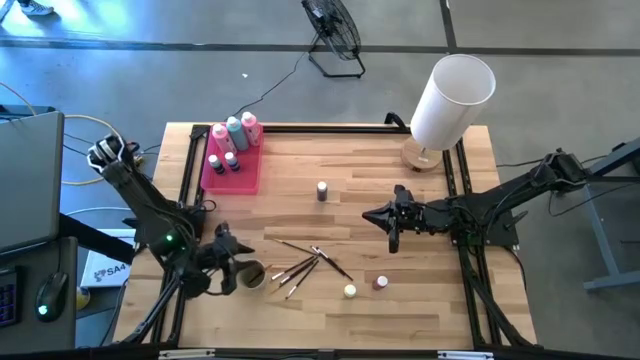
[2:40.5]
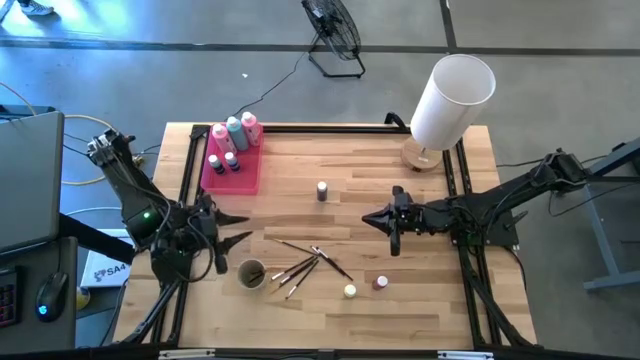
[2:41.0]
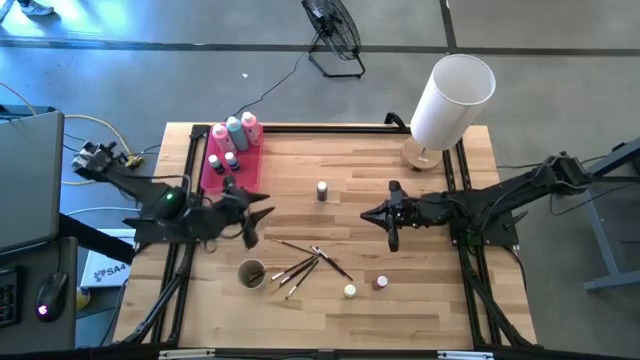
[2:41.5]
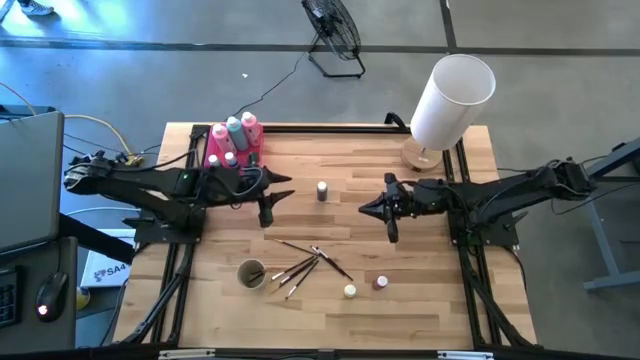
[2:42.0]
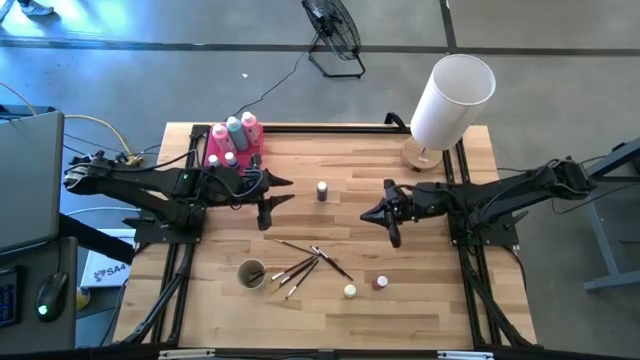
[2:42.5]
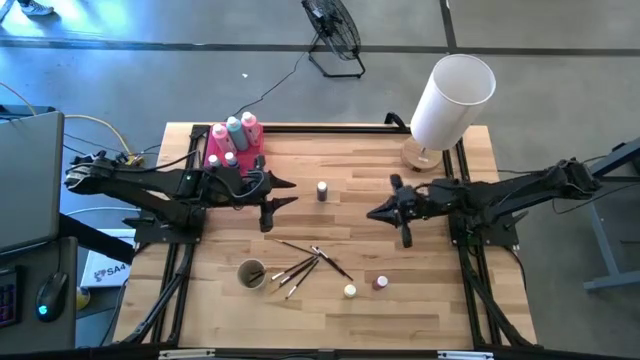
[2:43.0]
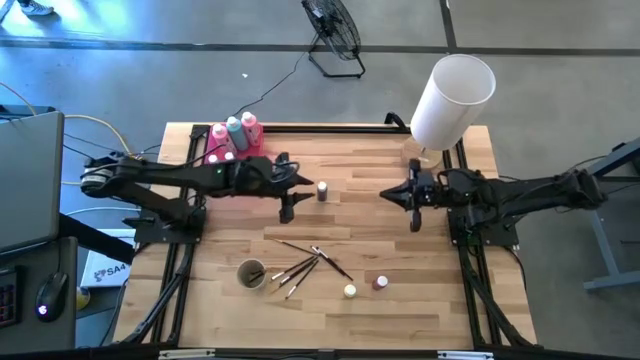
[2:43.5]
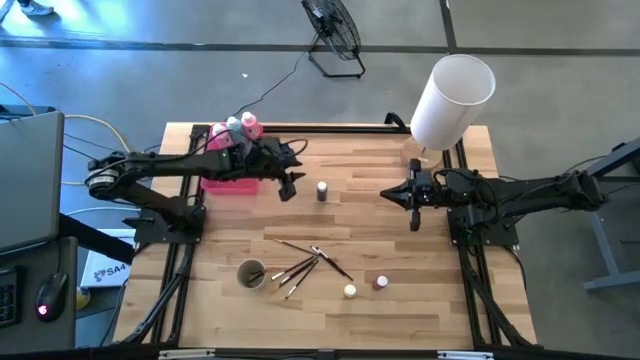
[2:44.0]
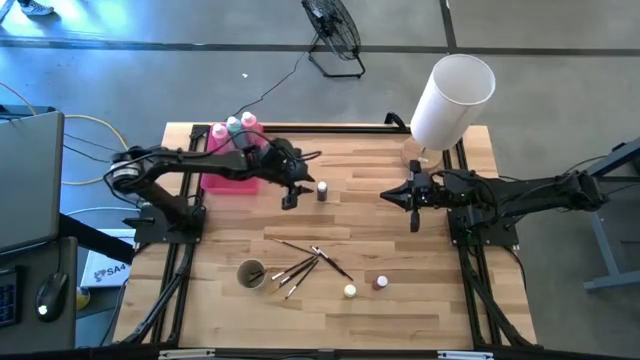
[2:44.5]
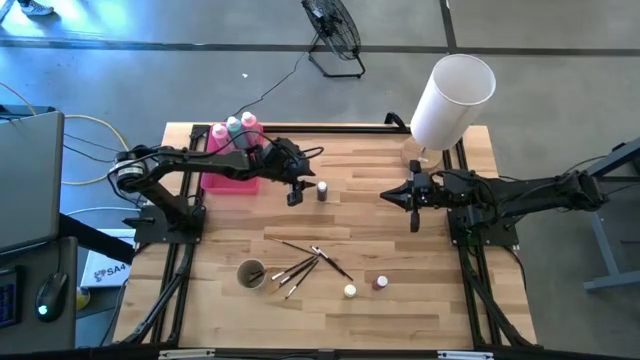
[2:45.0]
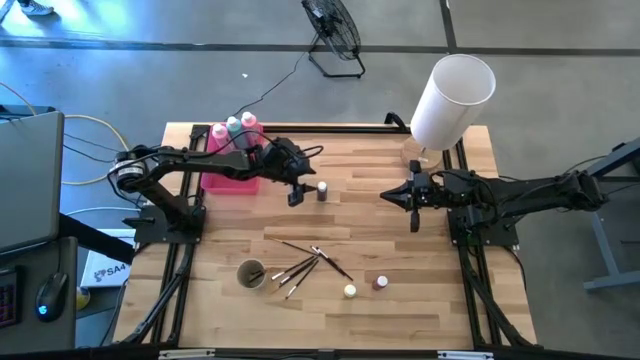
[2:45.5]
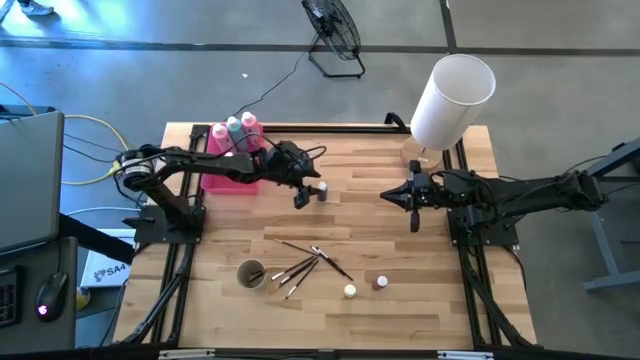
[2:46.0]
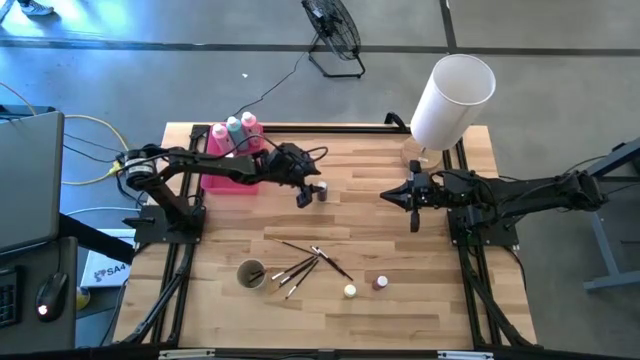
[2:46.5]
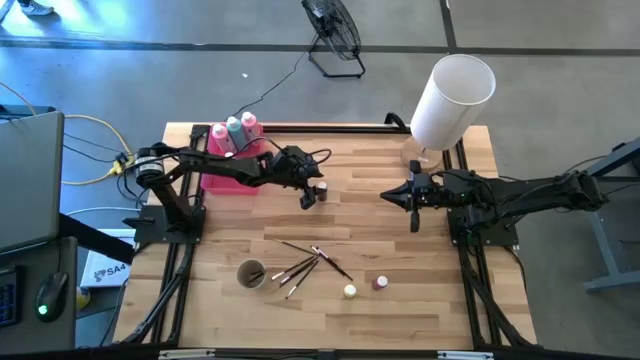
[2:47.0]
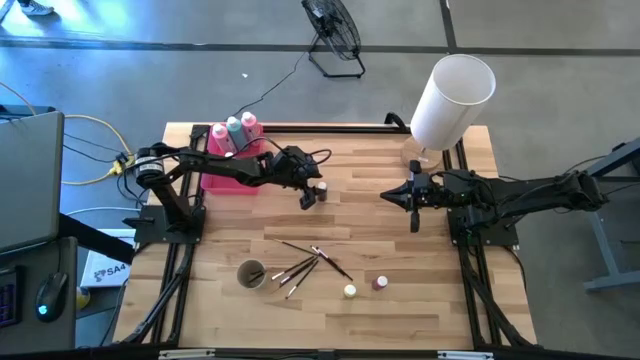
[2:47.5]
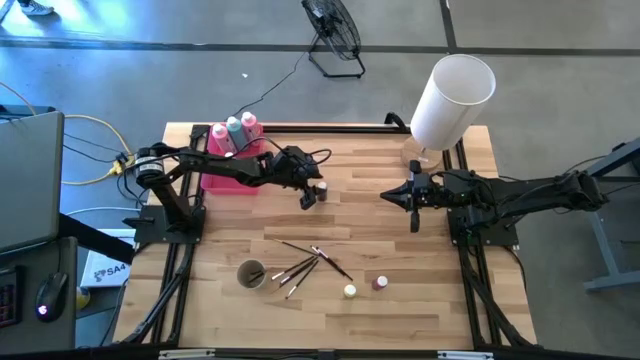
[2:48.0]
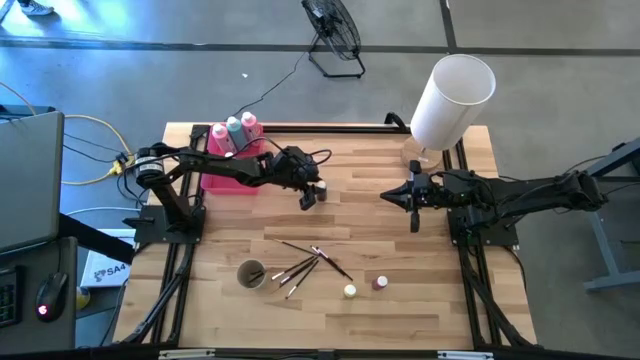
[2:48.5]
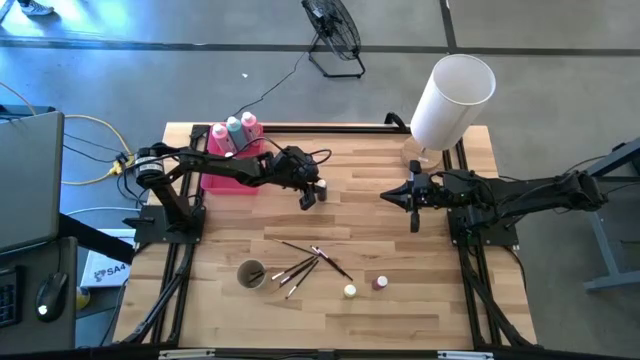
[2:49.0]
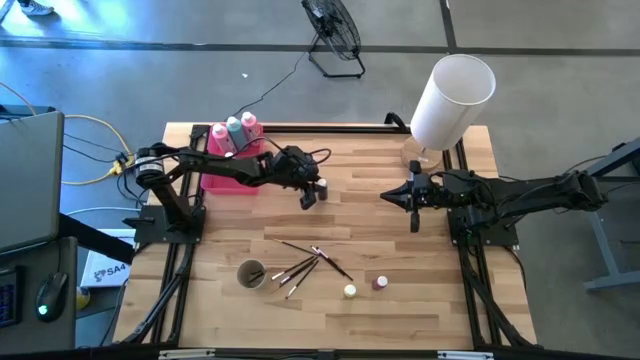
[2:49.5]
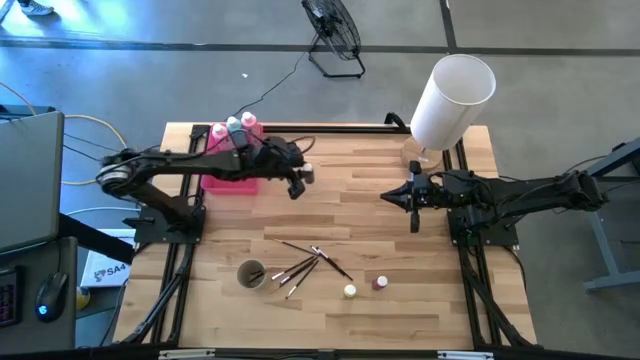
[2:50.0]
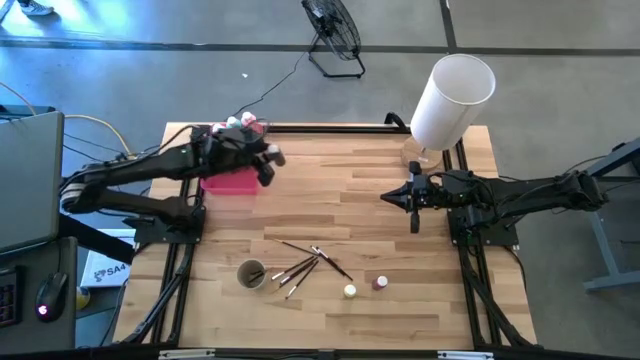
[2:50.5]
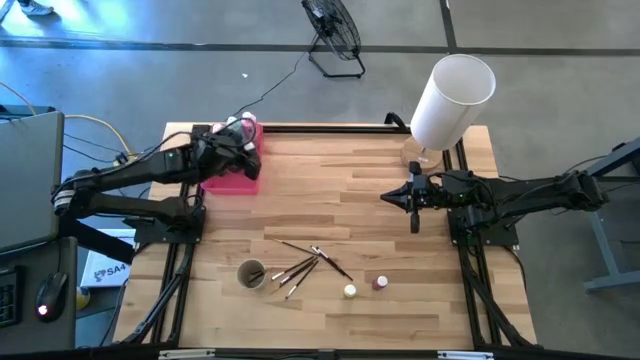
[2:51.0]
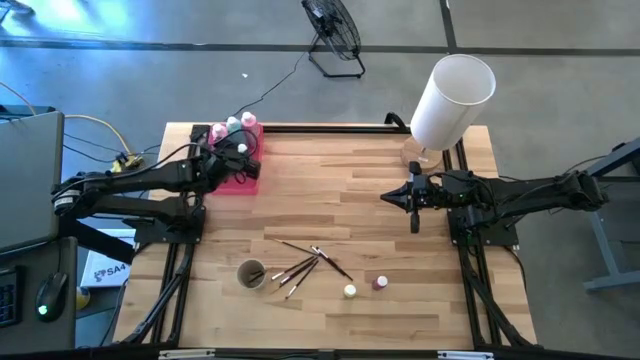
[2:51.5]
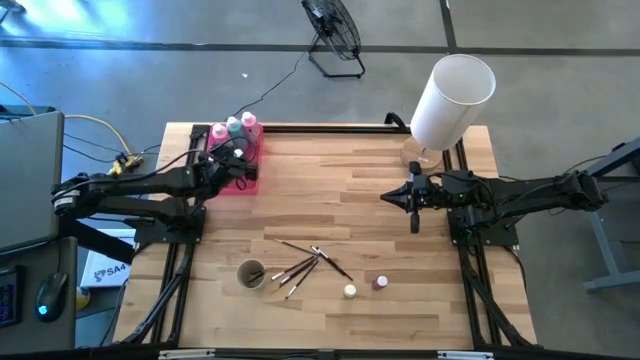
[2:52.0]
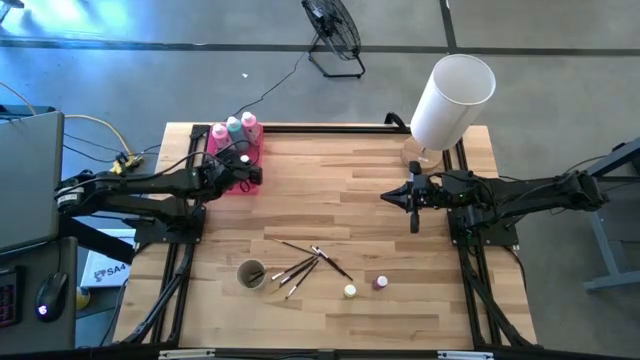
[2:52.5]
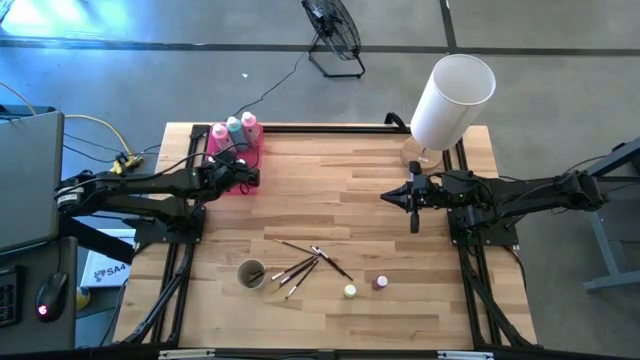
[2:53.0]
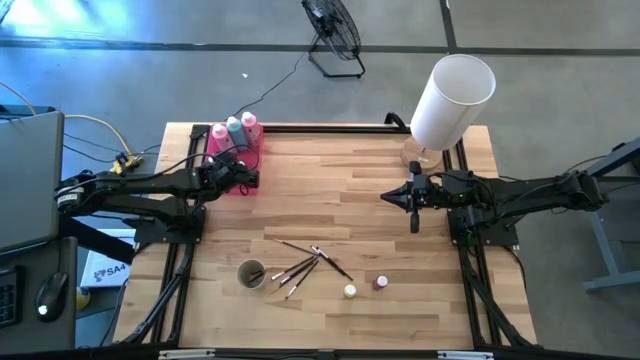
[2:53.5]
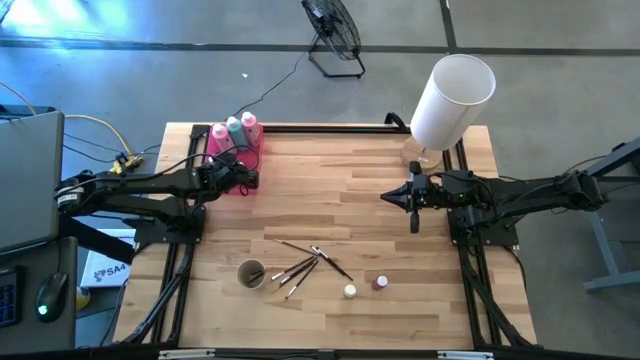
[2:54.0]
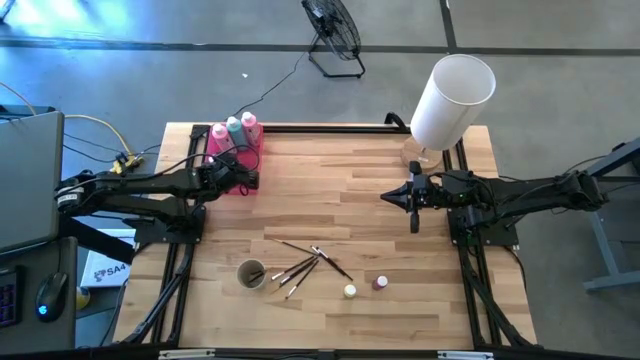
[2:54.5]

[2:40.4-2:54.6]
Task: Pick & Place Paint Supplies
Put the small blue paint bottle into the pink bin

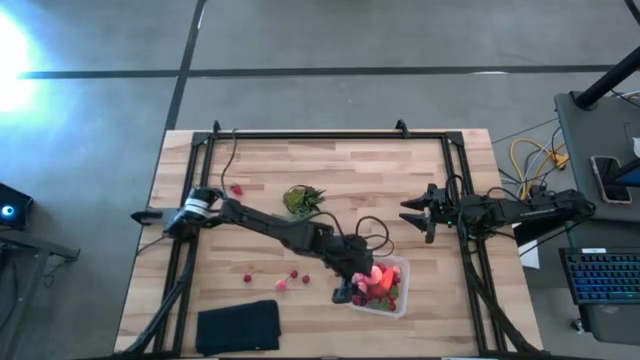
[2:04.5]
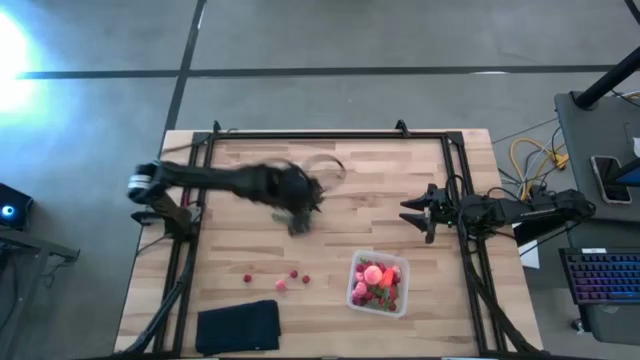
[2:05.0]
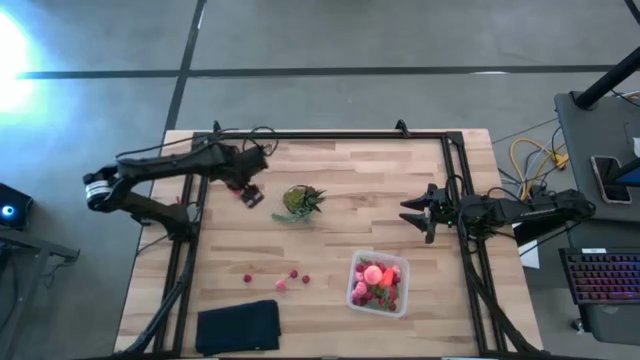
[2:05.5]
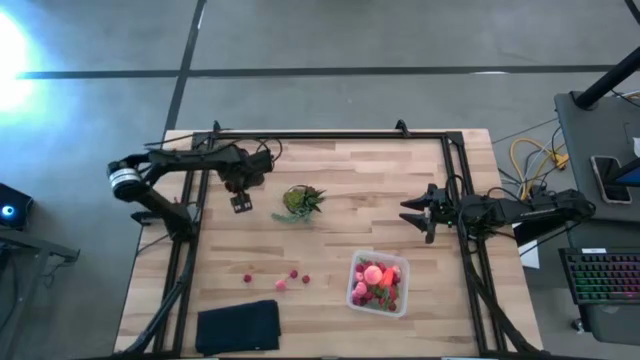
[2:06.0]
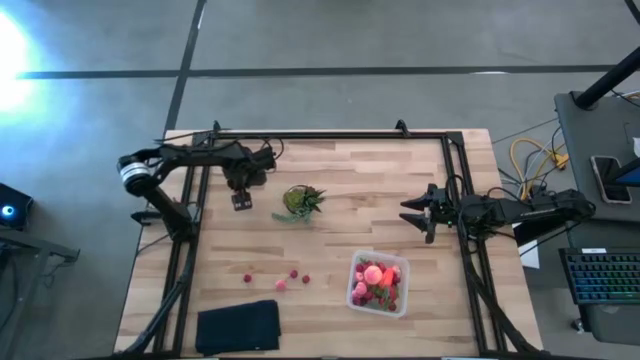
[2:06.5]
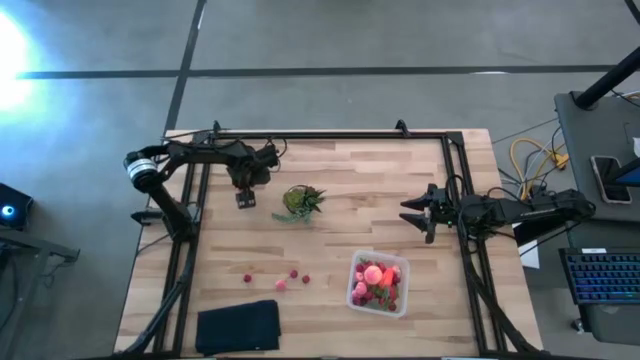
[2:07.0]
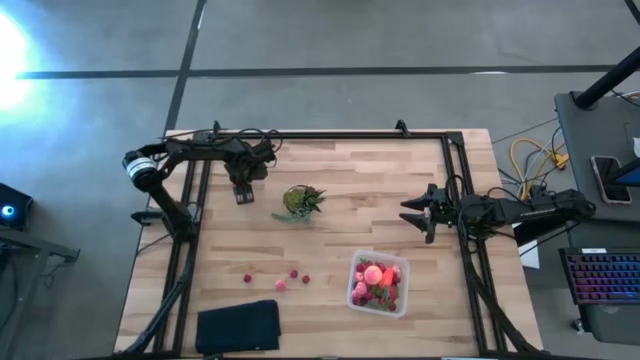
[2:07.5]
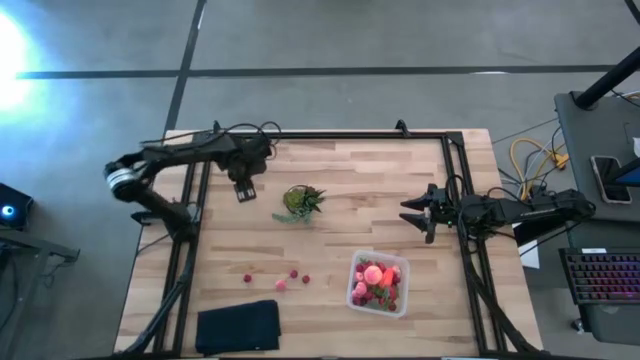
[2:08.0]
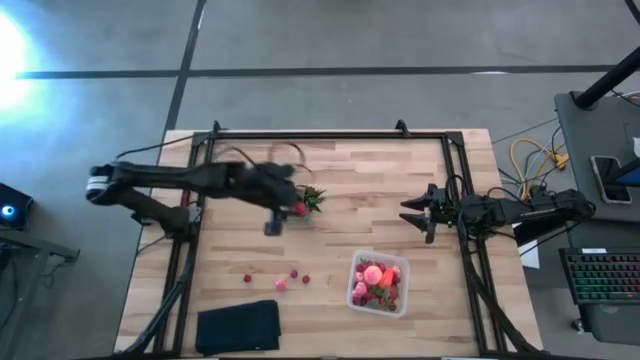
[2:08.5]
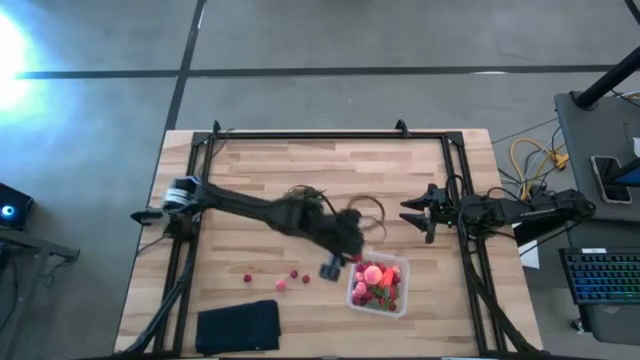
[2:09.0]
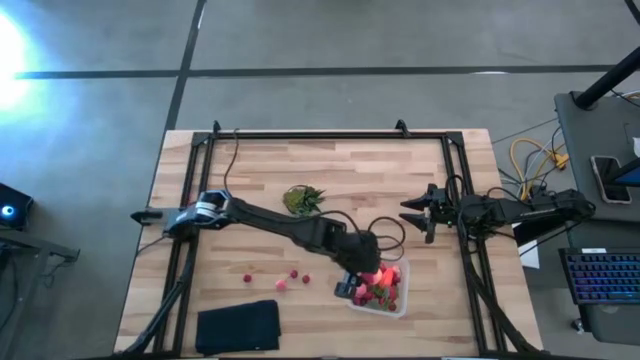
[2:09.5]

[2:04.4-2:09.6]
Task: Pick and placing Produce into tupperware
Put the strawberry into the bin
